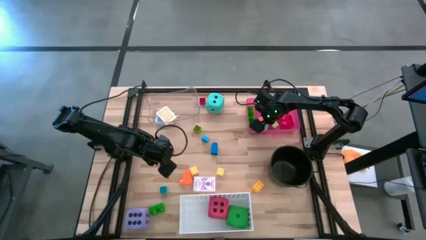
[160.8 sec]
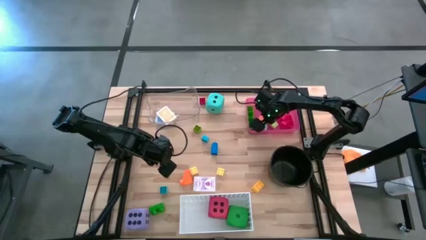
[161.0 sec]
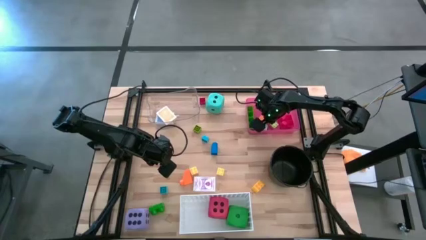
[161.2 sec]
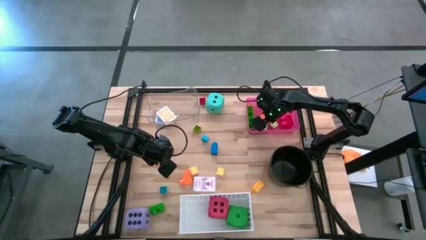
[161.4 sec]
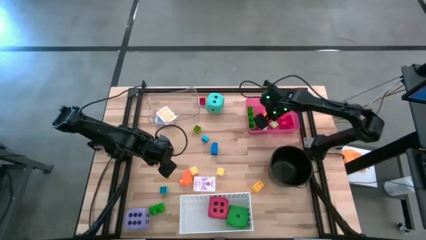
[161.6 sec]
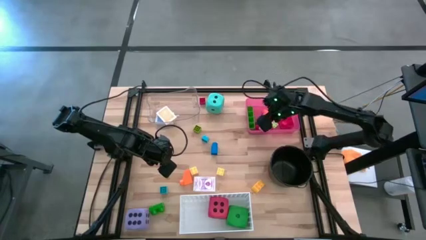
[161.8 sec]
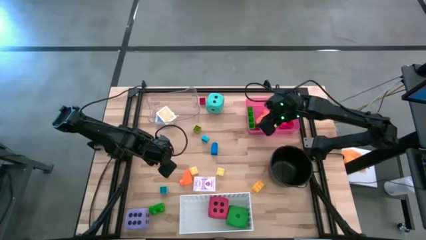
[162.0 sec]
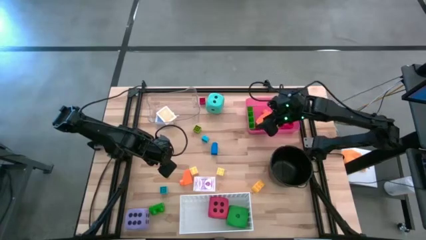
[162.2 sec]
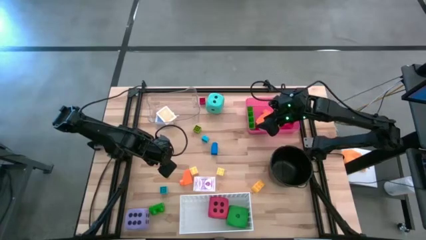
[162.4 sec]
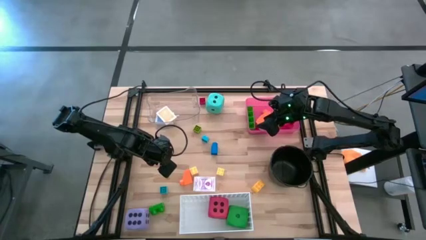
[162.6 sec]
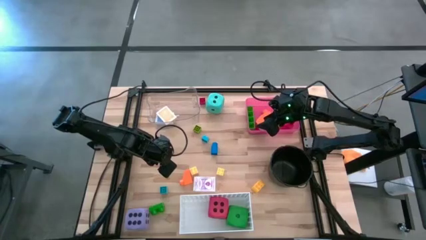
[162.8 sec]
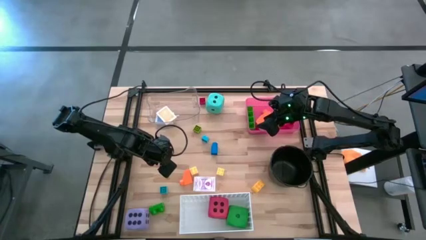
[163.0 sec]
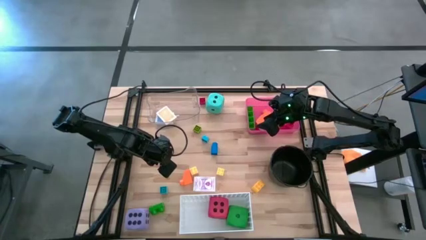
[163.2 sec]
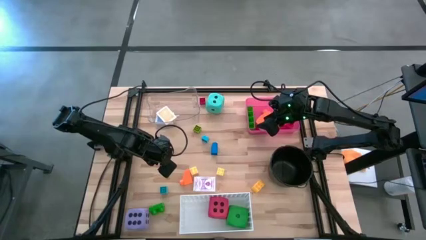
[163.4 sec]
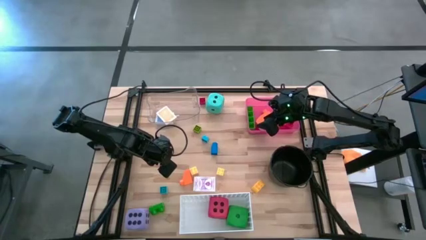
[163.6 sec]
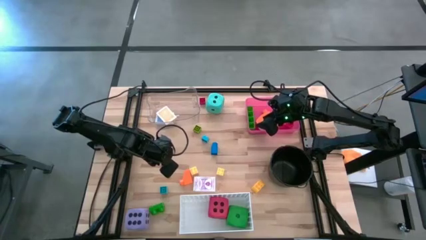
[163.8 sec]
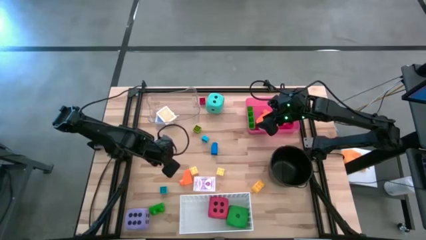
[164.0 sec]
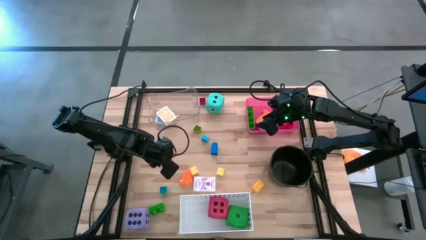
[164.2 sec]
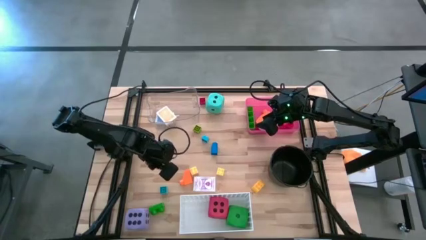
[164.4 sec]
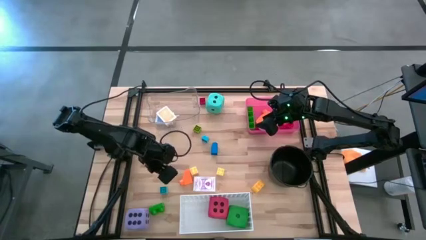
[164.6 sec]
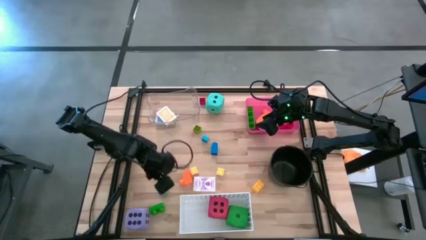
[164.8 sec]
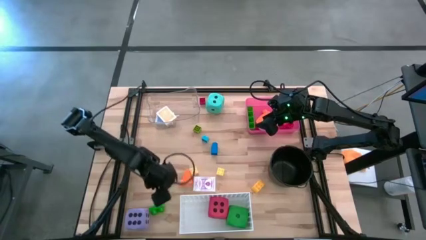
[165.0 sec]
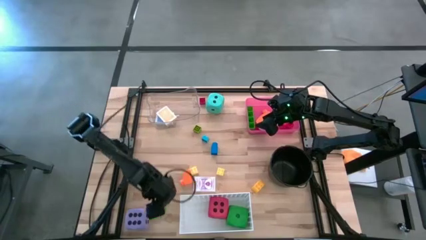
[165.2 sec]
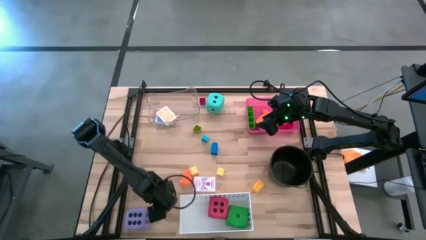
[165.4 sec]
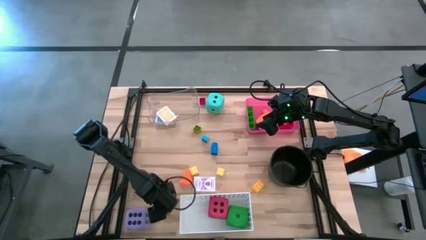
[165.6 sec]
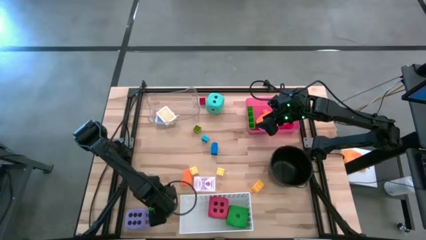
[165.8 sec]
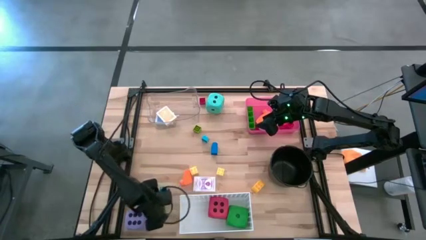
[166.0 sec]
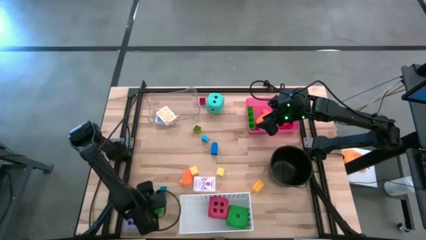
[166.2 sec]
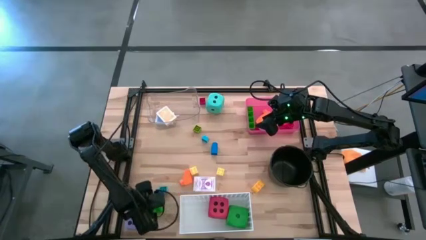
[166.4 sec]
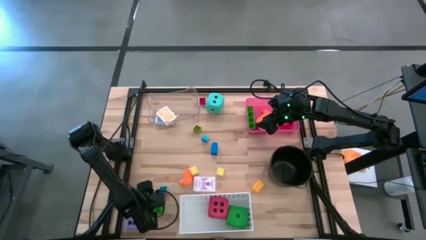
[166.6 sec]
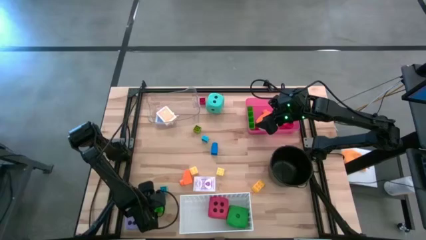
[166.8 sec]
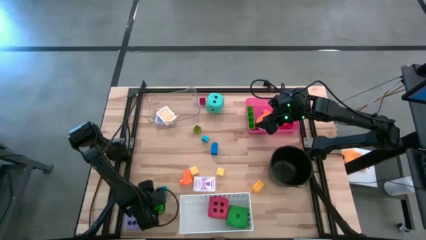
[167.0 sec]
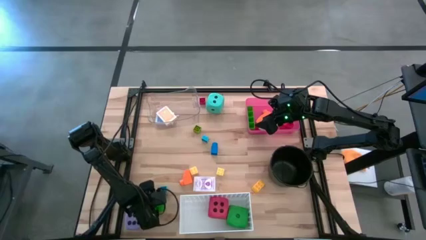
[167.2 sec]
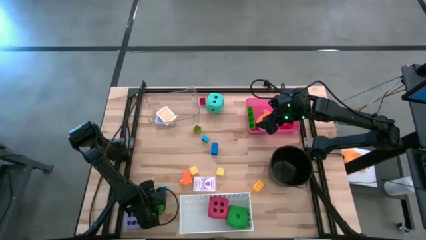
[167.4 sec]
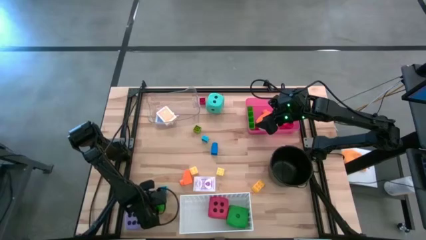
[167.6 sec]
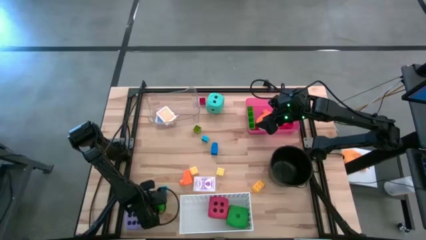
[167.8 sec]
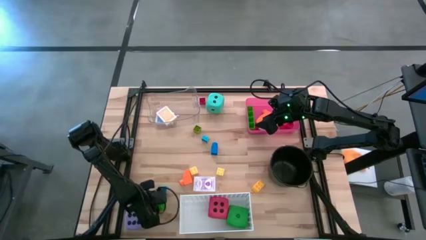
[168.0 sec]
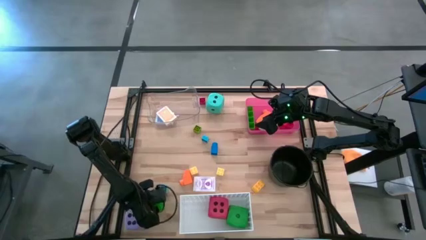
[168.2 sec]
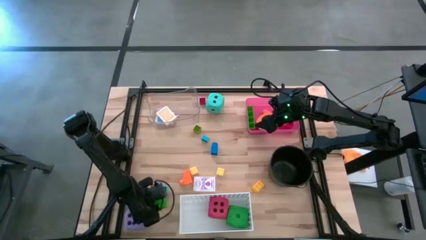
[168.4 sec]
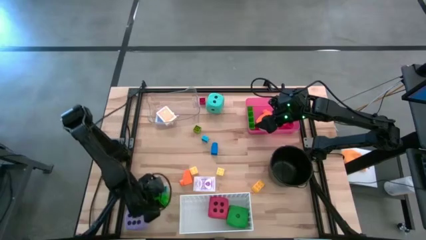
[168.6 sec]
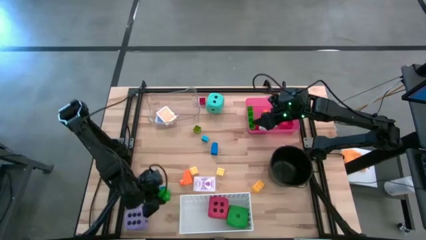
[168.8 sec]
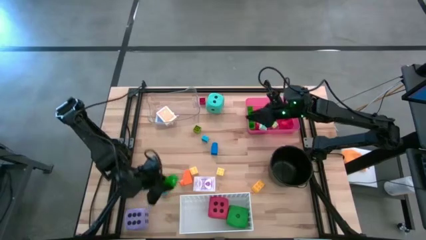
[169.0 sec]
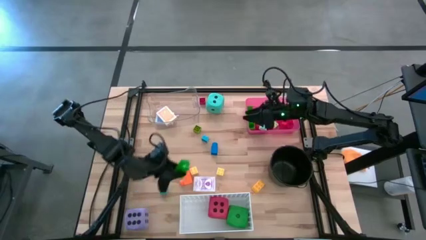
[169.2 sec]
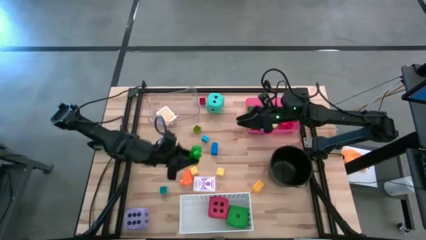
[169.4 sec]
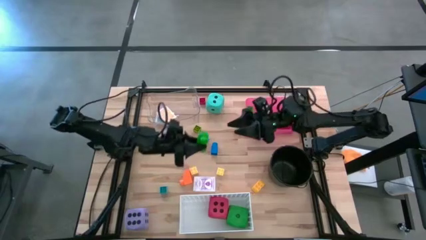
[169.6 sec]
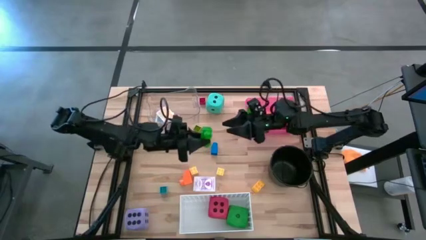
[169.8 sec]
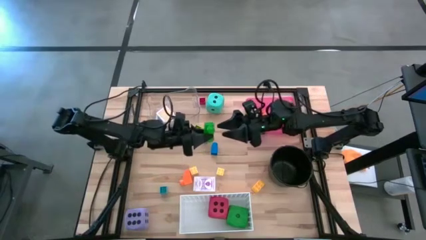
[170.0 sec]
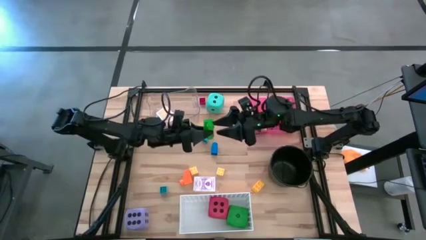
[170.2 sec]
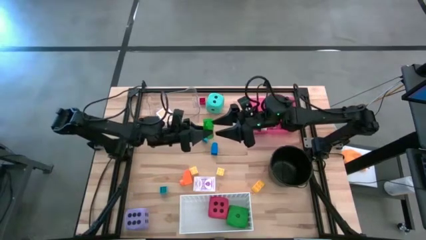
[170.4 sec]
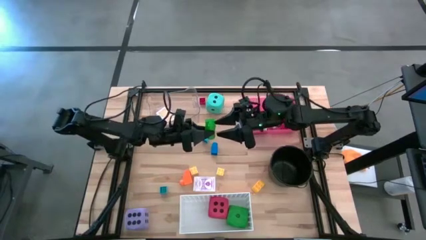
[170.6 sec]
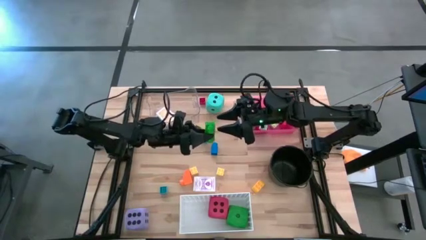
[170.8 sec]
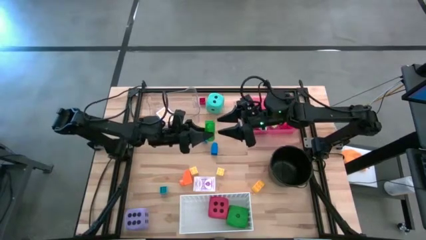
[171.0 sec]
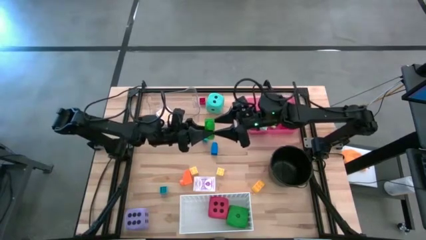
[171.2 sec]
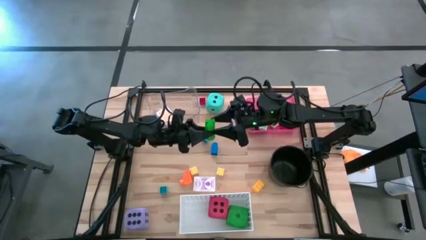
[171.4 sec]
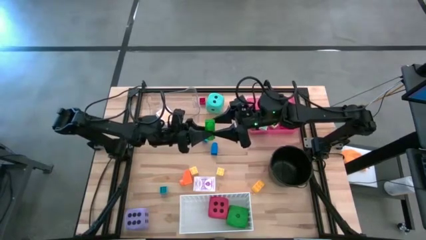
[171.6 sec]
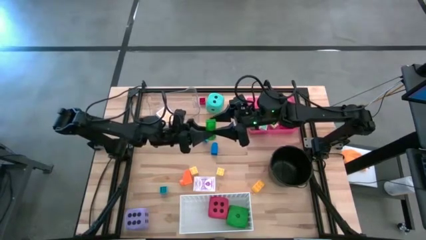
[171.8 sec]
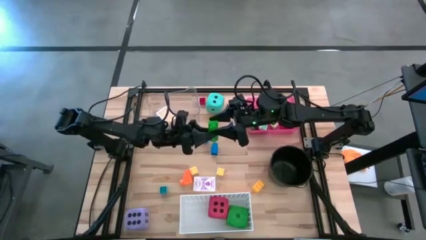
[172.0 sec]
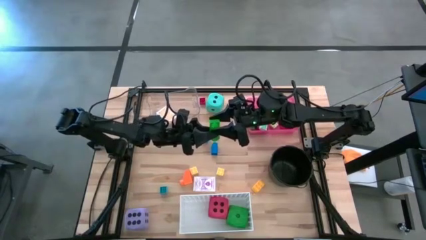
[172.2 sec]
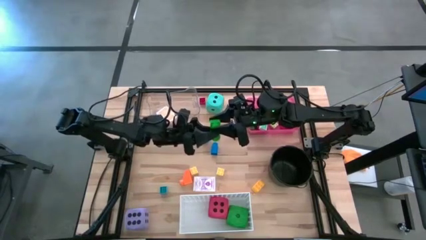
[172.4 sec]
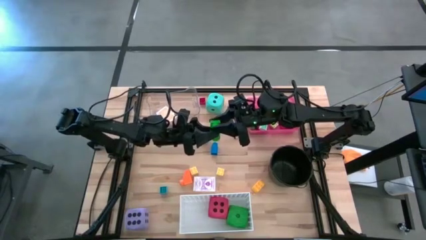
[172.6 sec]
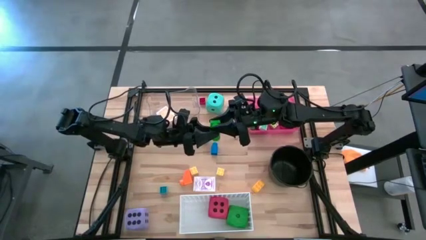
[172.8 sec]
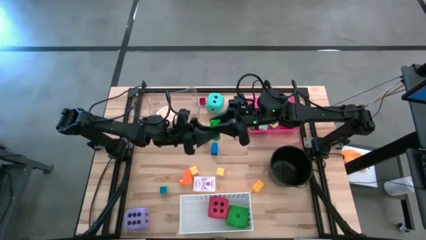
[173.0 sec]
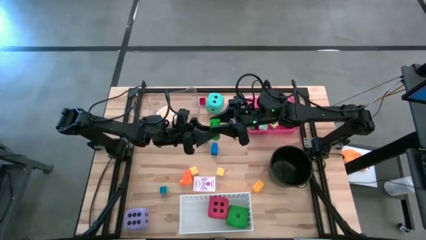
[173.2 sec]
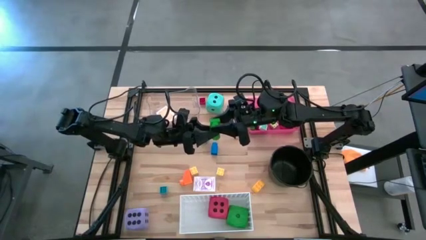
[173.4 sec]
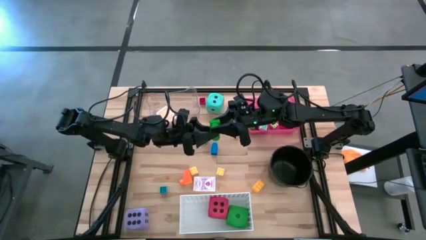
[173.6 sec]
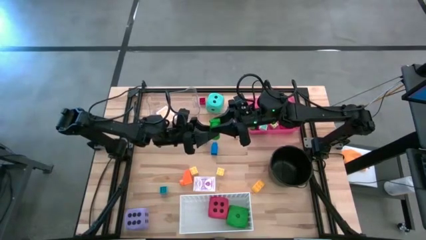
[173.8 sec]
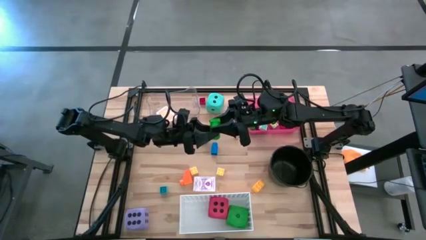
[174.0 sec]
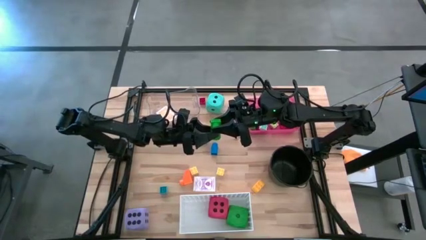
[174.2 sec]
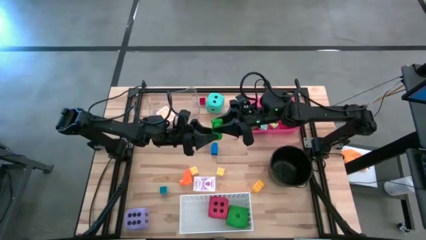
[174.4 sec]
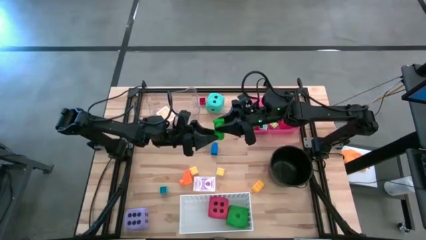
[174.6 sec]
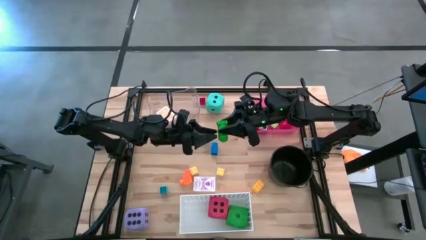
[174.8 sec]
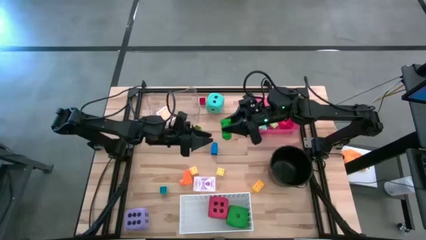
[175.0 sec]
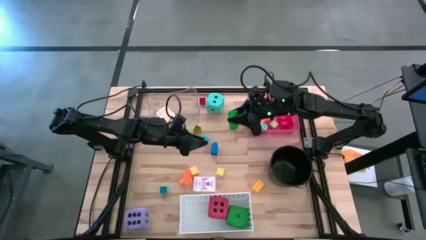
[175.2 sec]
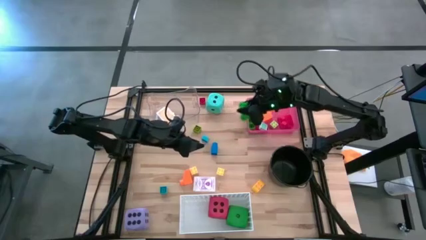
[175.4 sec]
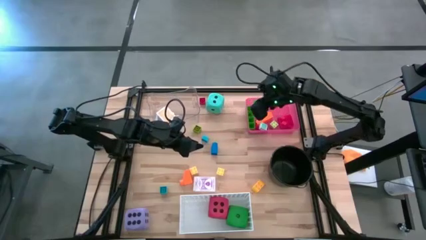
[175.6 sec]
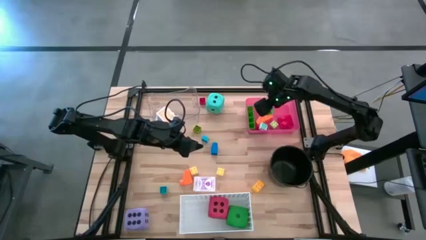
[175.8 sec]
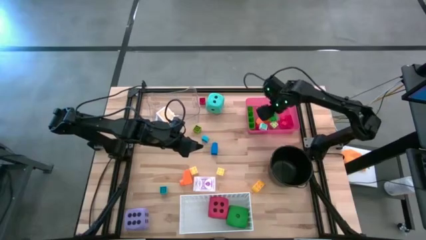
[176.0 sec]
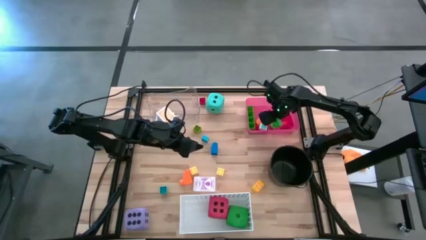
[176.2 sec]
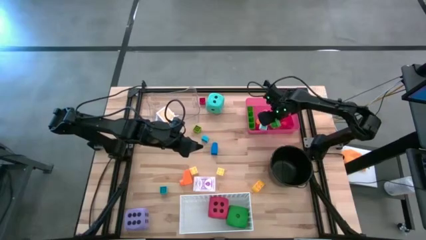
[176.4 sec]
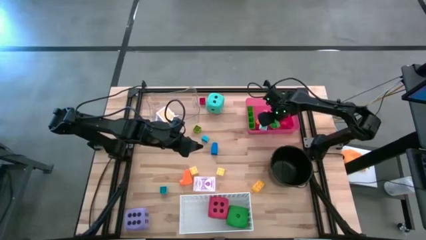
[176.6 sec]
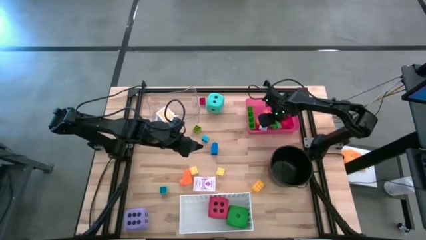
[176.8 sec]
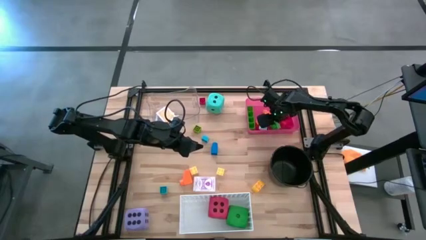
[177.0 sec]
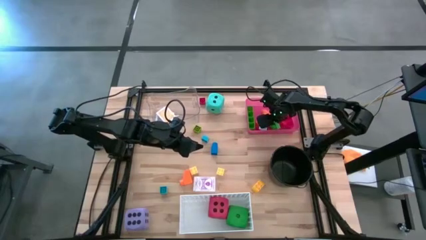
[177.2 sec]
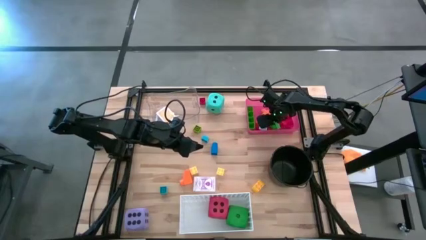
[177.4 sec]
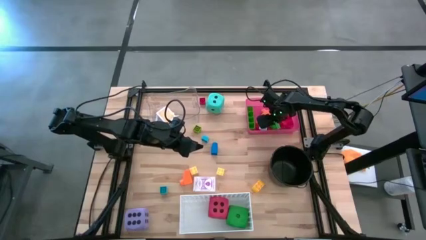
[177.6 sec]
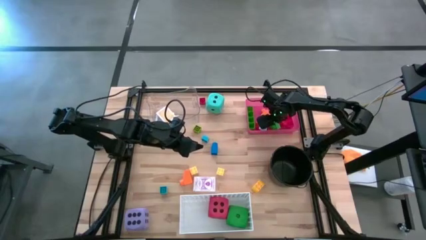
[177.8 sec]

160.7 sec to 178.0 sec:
Task: Pick & Place Toys
Put the green game piece into the red bin
